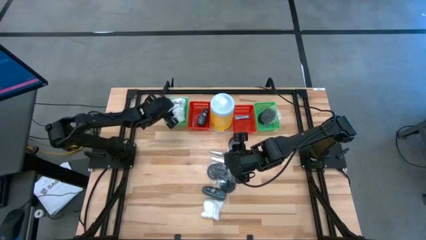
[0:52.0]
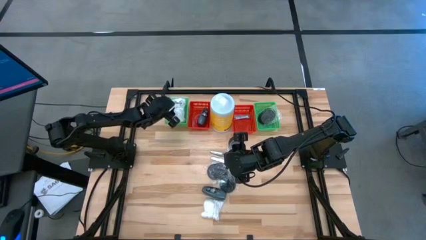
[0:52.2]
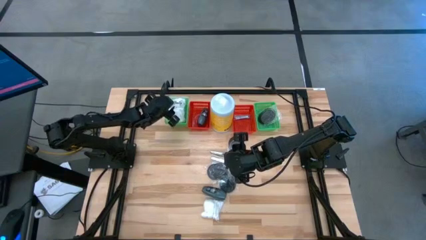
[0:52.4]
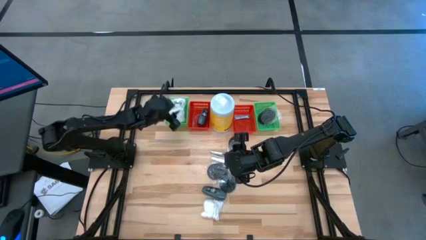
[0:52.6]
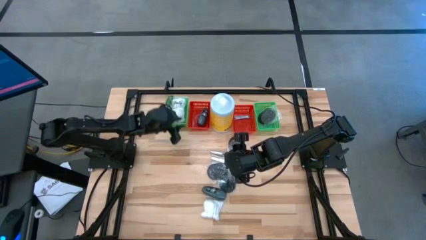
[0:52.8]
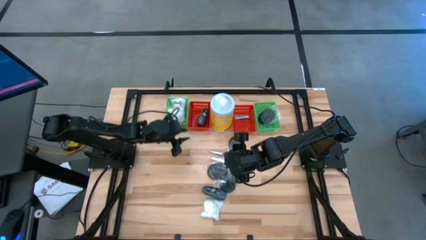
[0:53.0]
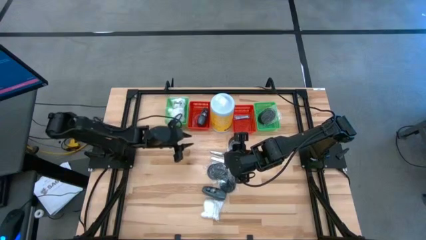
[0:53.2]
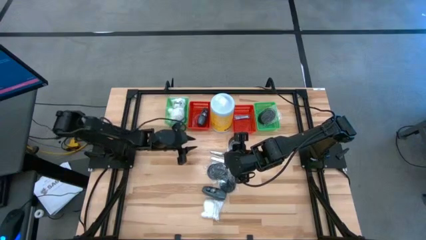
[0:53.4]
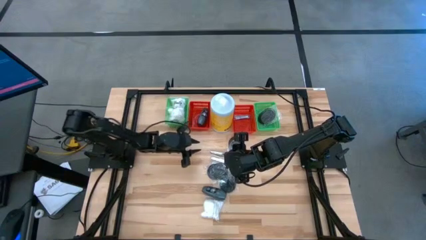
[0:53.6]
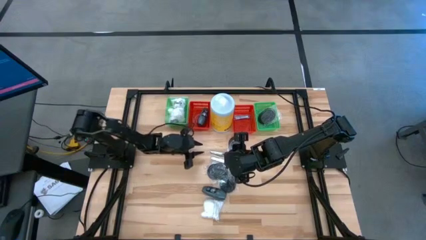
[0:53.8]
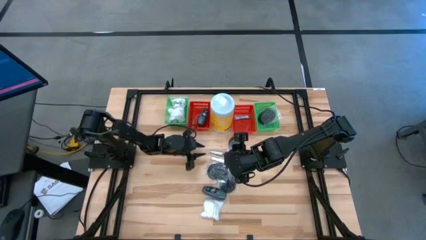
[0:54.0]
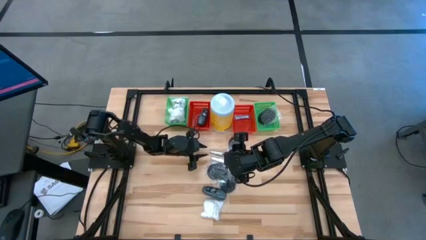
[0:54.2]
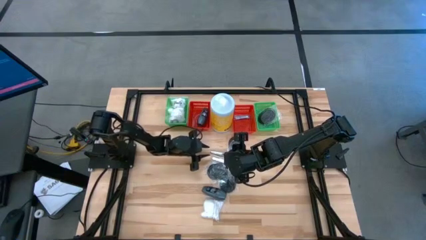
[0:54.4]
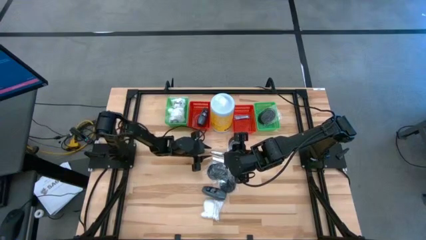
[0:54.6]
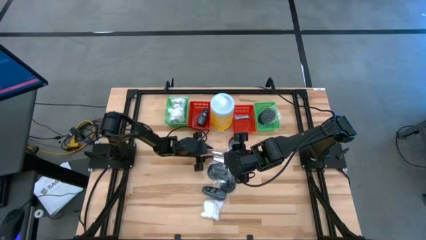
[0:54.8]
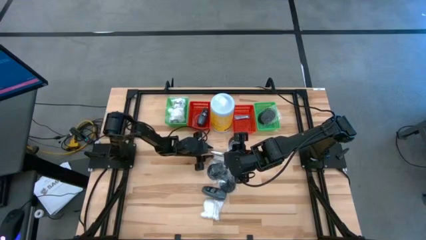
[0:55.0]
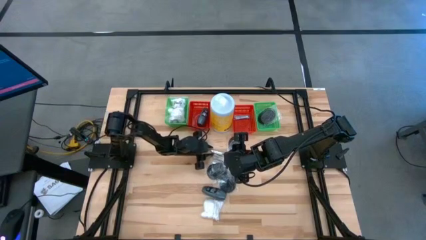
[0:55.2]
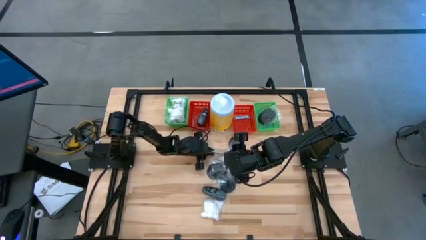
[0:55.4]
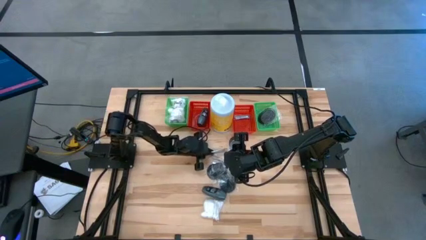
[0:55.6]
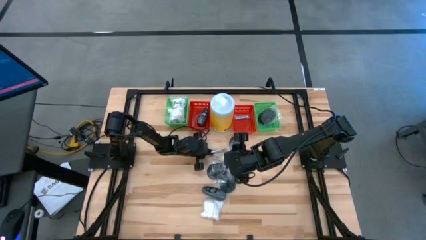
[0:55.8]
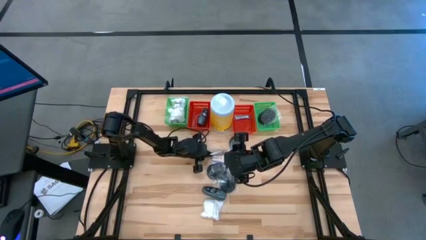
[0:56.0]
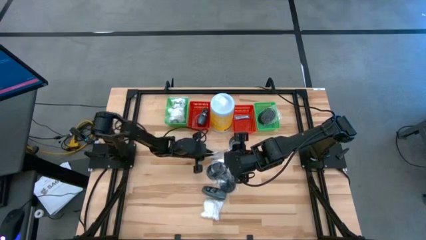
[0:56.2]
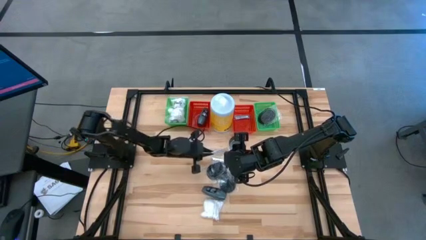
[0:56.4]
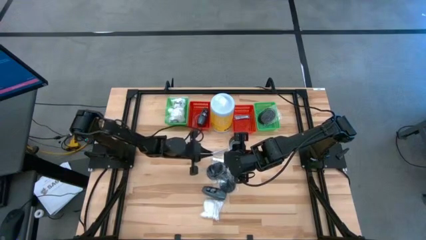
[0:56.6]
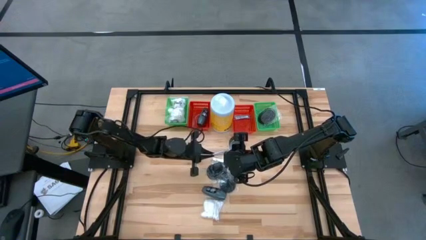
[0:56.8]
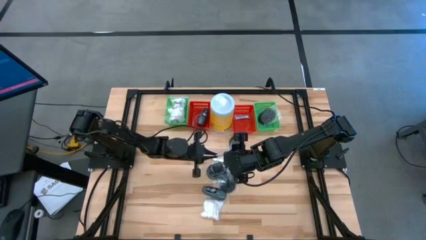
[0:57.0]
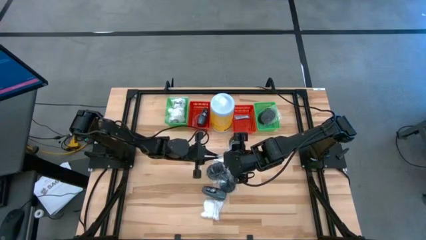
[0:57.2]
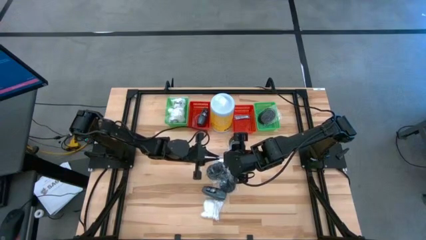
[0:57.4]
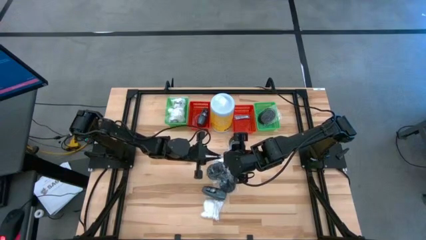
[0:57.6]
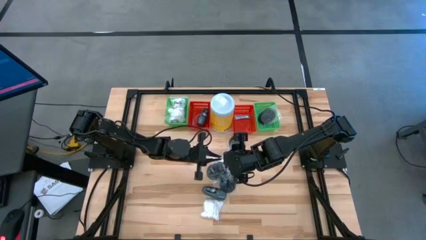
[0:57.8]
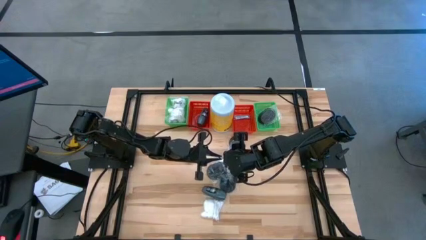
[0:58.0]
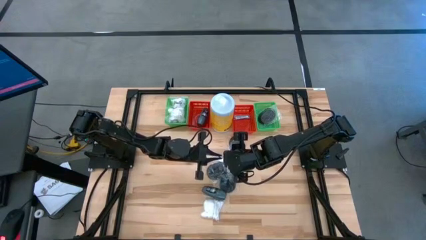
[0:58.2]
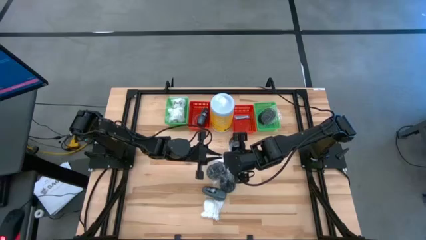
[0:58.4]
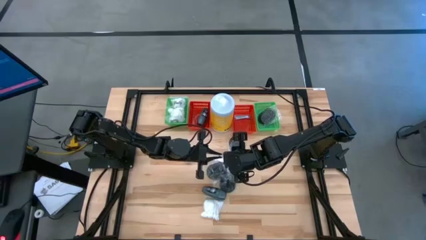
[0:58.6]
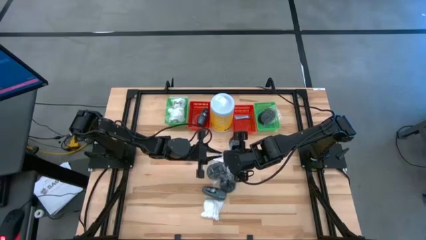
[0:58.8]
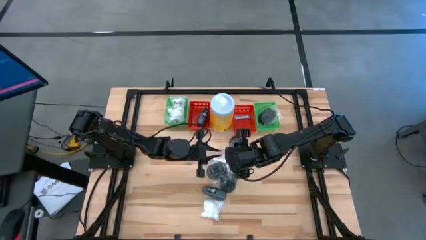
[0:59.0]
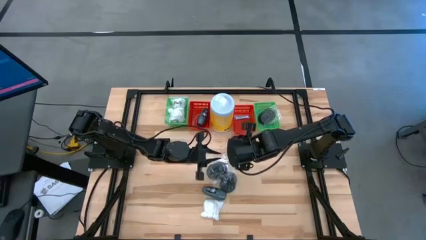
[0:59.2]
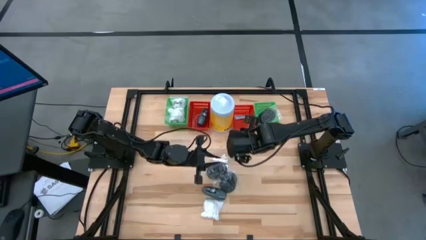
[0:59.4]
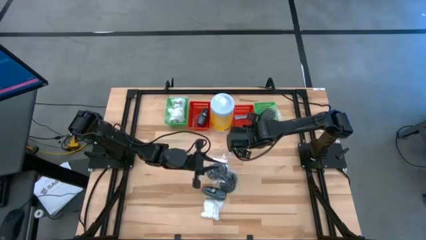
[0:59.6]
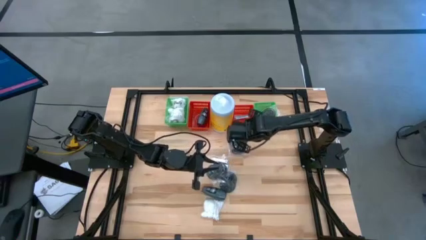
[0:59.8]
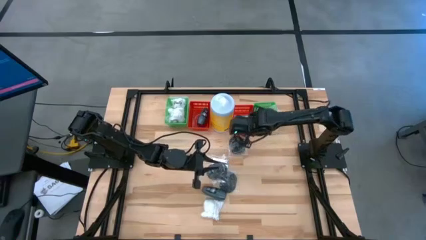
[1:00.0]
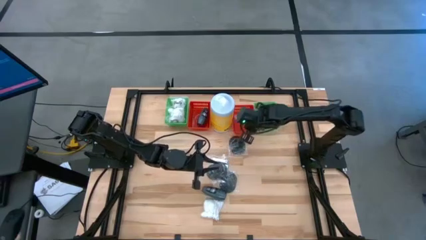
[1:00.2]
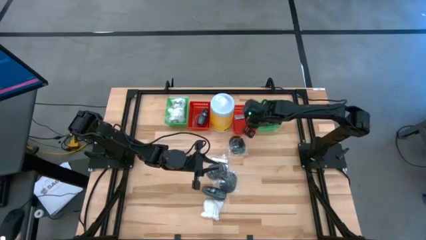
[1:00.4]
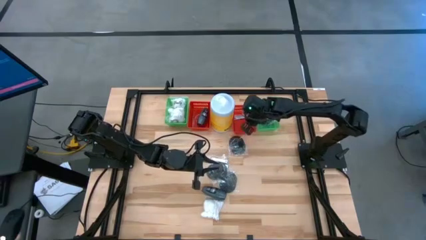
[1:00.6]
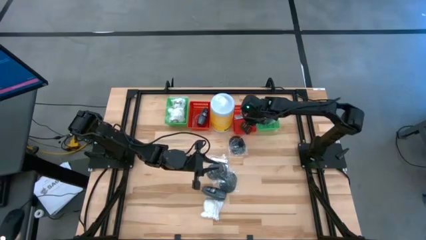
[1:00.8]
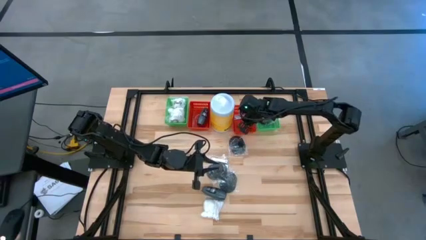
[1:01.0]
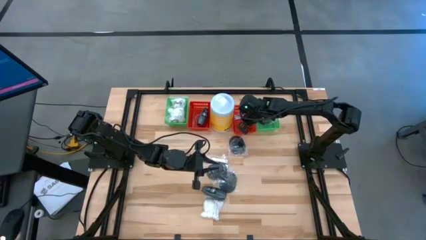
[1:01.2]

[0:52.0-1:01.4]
Task: Pick & Place Travel size toiletries
Put the silver nail cutter into the right red bin

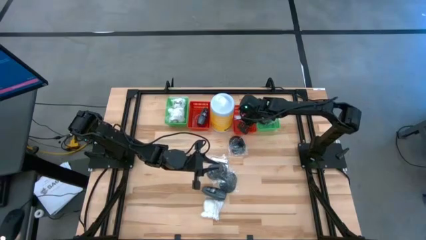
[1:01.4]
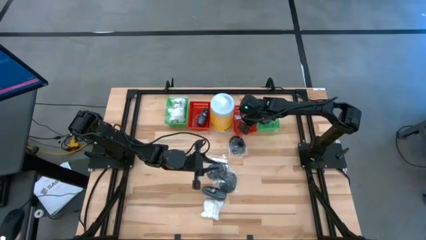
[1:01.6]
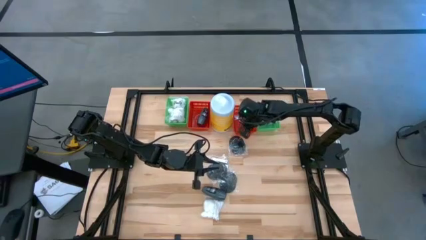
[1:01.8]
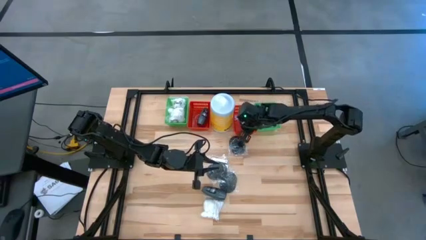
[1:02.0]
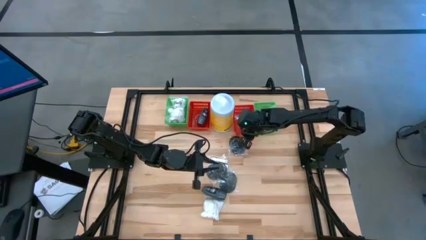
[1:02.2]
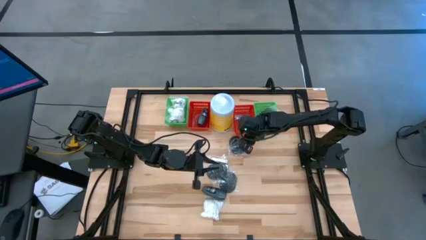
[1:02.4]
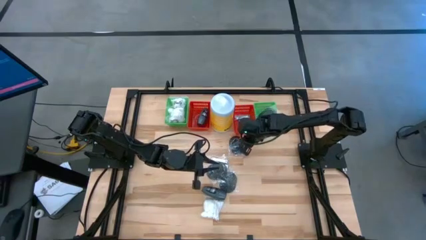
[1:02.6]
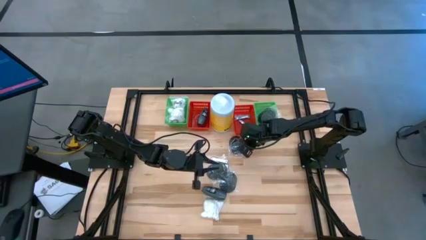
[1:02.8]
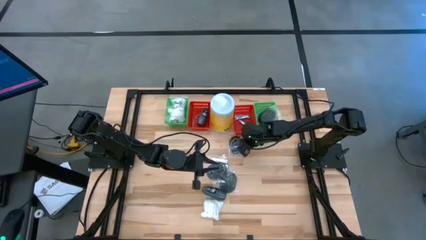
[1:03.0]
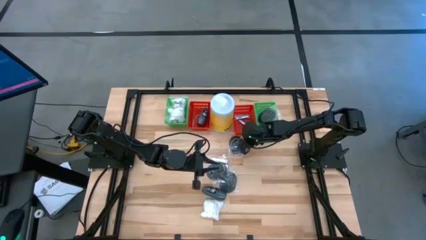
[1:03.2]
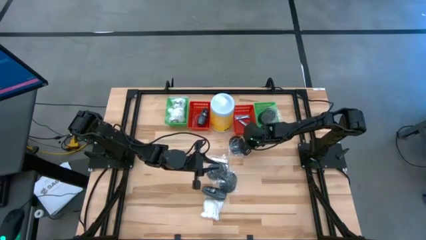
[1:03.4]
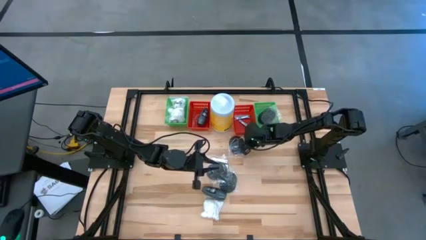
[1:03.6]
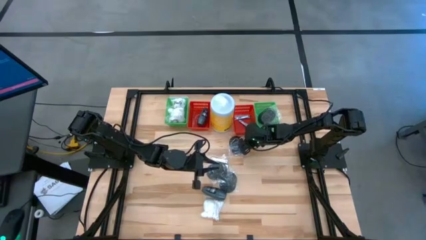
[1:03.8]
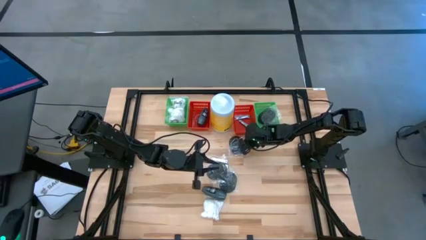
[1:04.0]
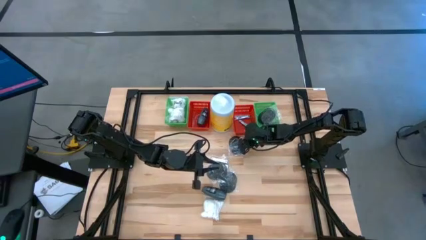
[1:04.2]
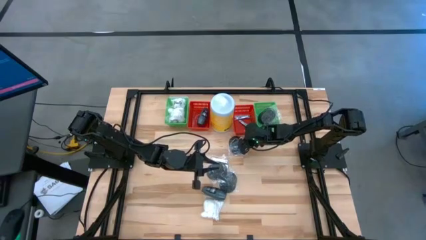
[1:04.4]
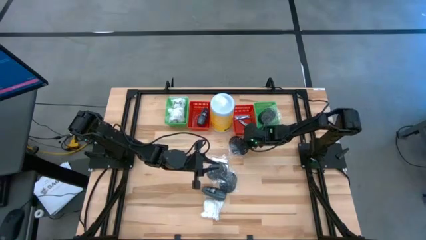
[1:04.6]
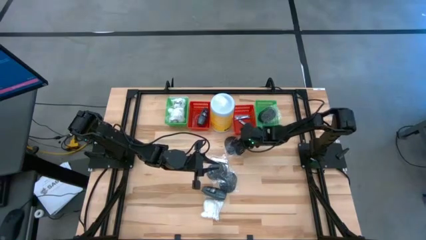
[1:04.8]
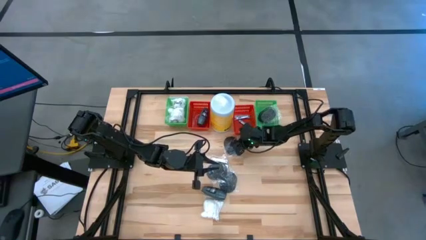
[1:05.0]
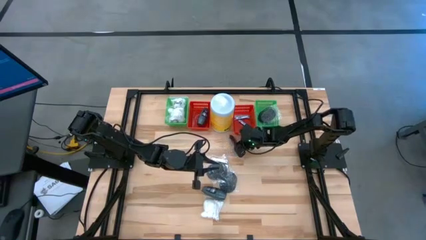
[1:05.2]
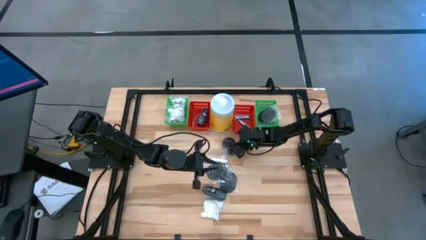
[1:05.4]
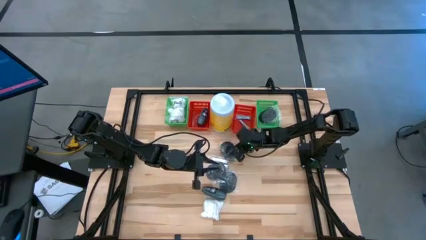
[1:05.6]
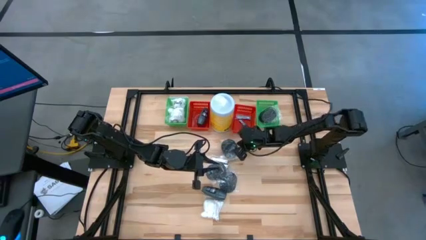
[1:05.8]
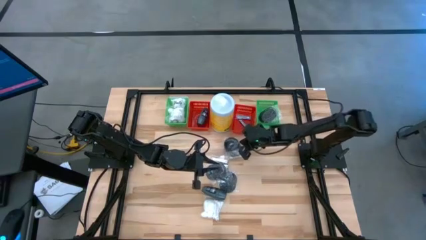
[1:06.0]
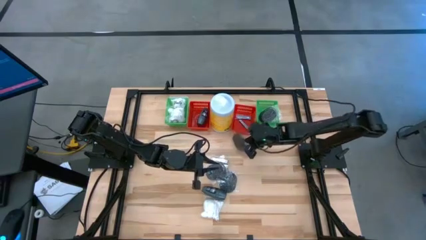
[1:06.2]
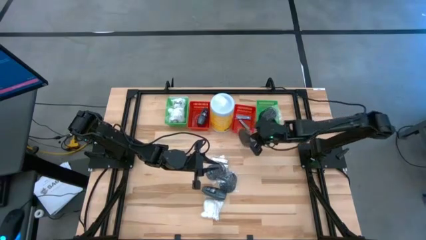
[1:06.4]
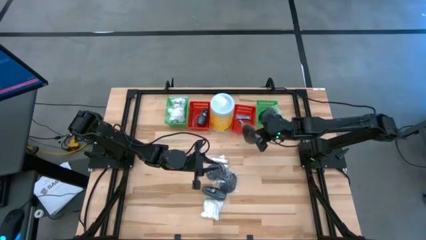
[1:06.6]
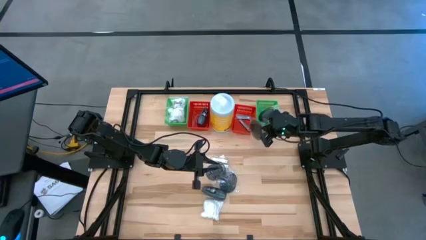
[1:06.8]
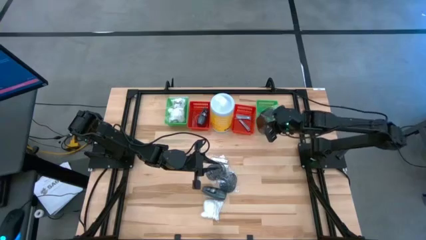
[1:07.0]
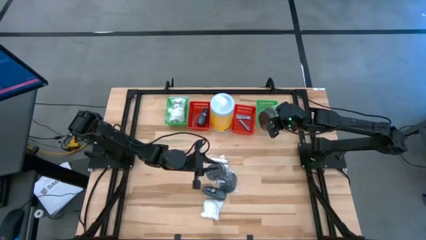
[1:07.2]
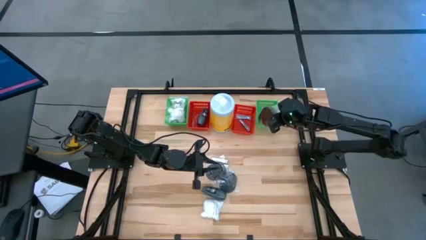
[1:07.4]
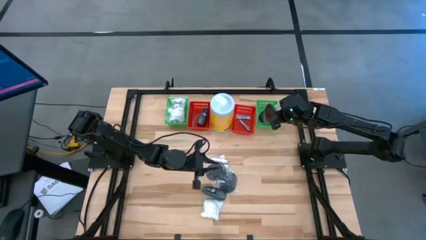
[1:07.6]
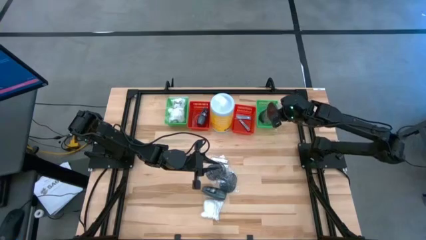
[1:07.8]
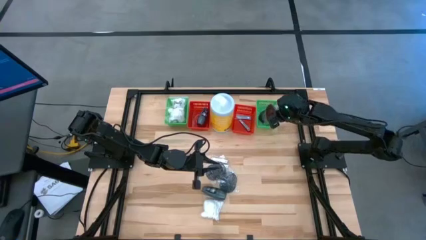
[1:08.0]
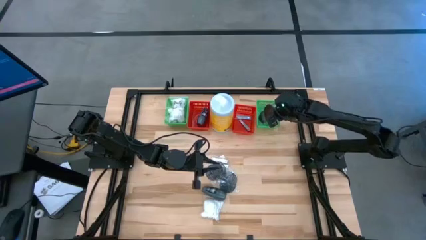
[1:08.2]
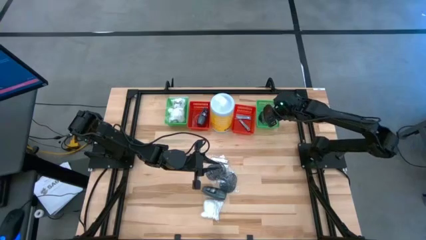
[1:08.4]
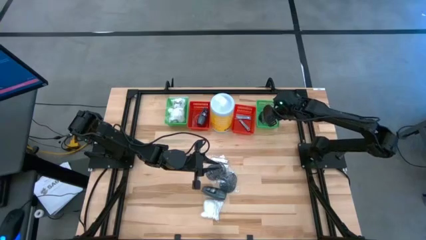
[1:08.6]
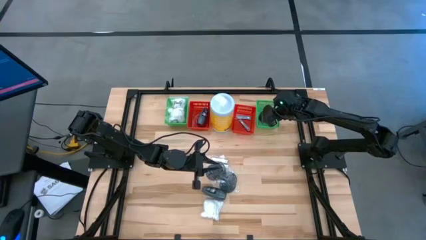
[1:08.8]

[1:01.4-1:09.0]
Put the black hairbrush into the right green bin
